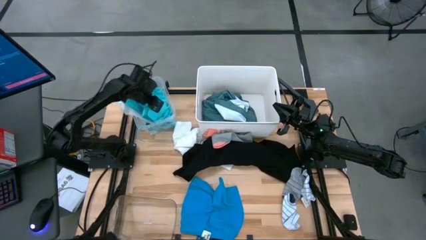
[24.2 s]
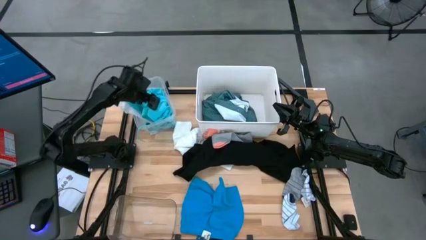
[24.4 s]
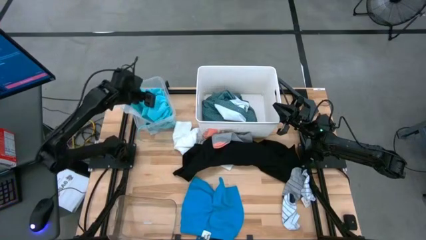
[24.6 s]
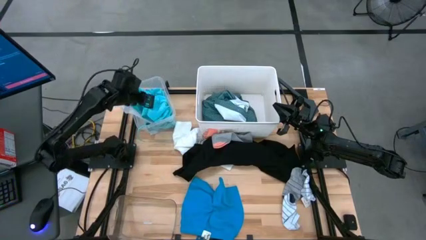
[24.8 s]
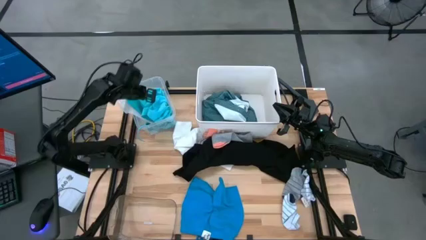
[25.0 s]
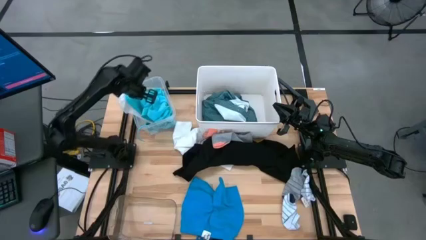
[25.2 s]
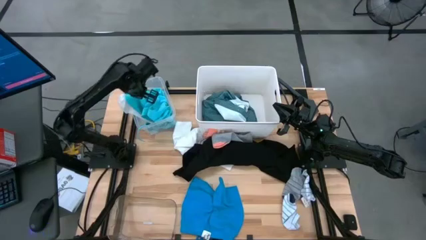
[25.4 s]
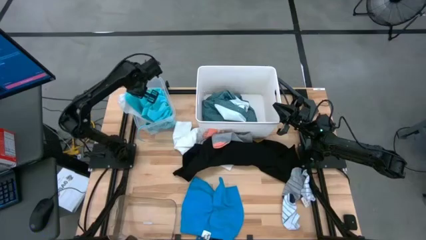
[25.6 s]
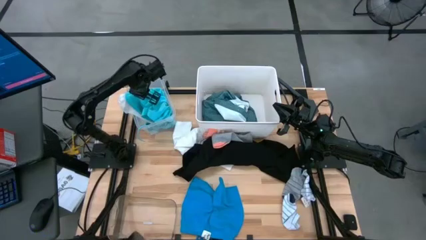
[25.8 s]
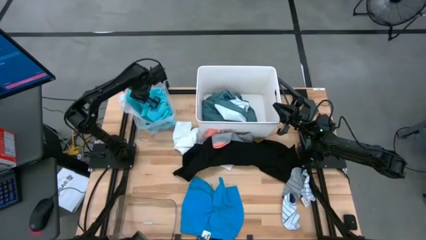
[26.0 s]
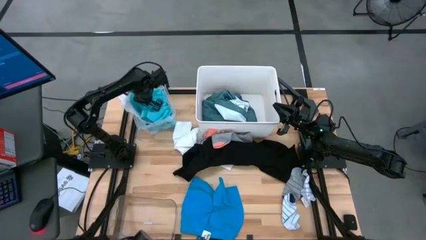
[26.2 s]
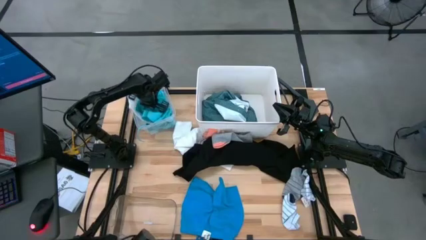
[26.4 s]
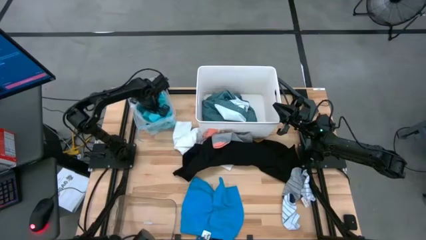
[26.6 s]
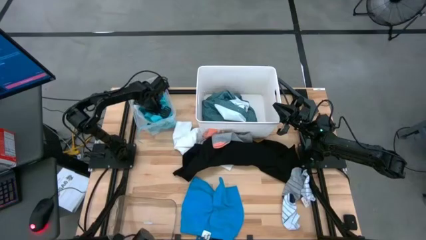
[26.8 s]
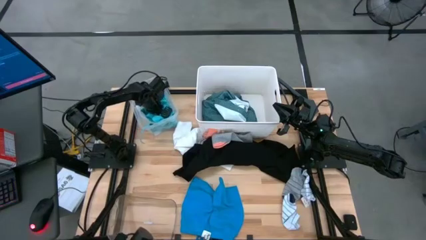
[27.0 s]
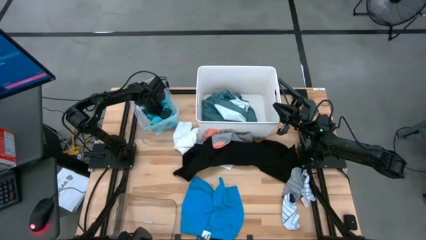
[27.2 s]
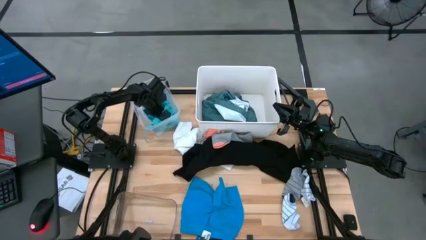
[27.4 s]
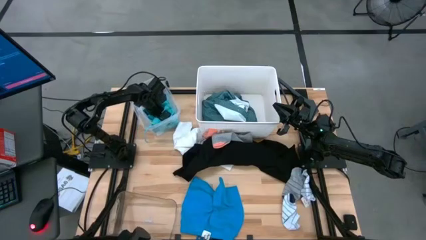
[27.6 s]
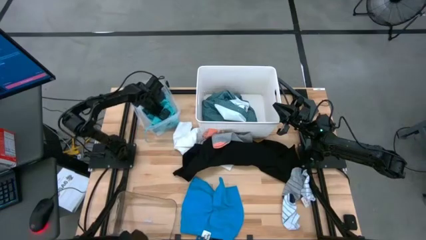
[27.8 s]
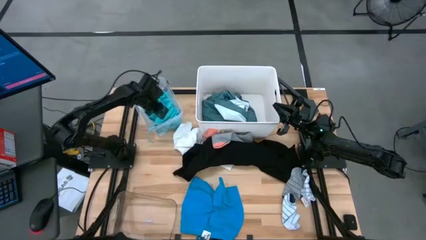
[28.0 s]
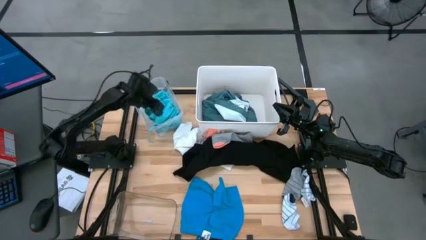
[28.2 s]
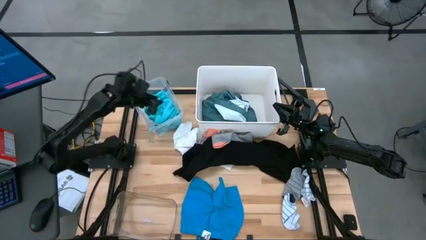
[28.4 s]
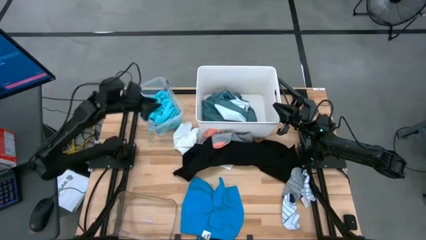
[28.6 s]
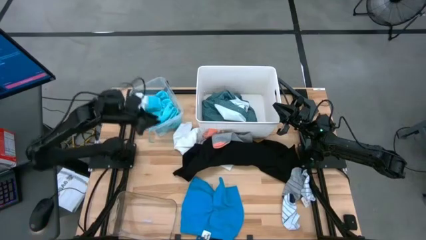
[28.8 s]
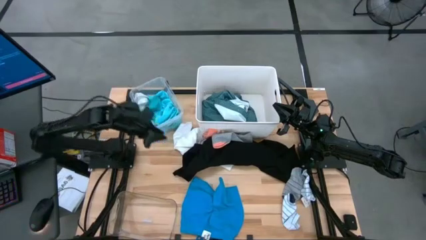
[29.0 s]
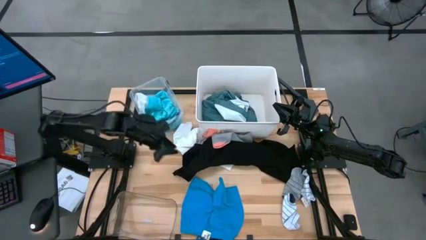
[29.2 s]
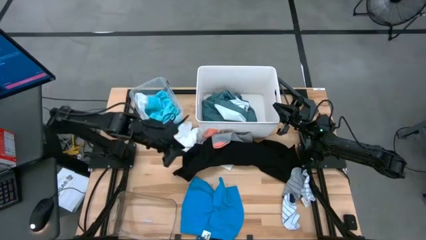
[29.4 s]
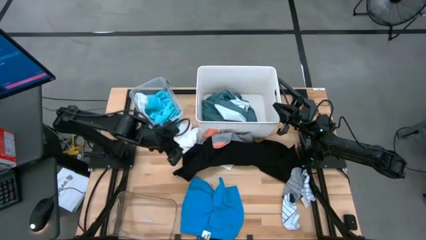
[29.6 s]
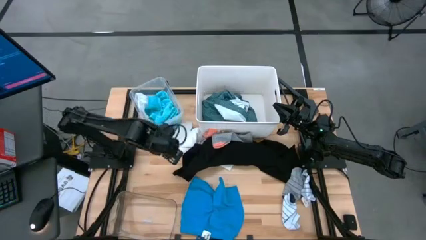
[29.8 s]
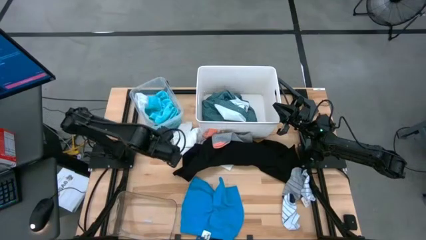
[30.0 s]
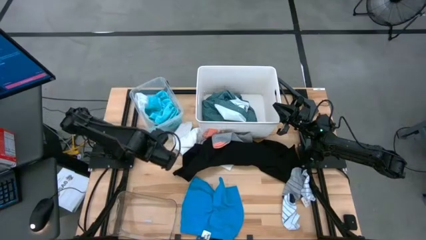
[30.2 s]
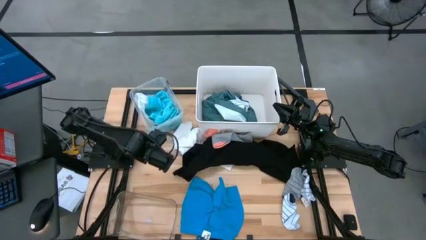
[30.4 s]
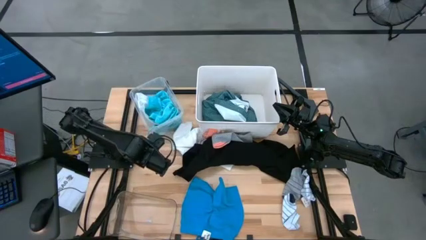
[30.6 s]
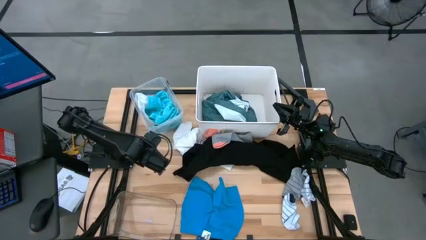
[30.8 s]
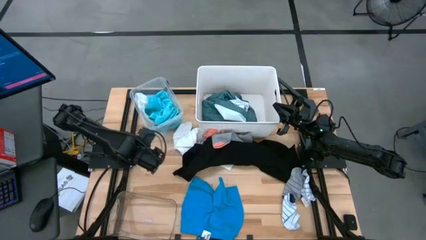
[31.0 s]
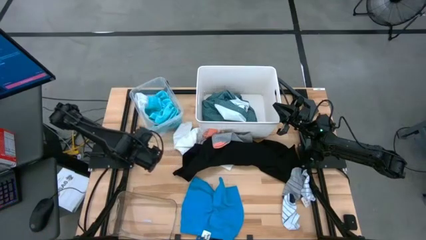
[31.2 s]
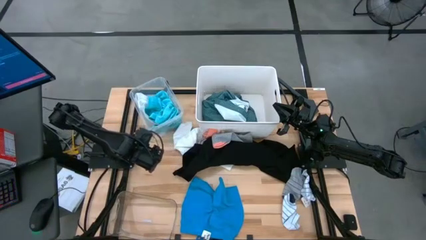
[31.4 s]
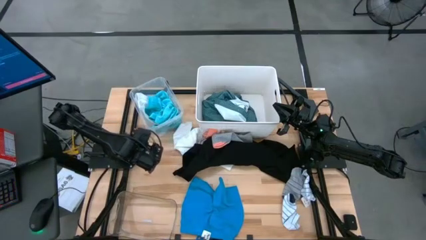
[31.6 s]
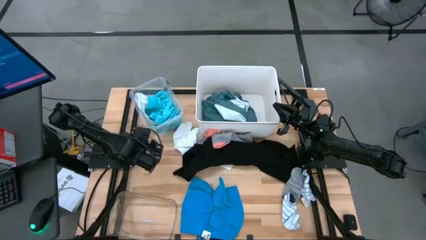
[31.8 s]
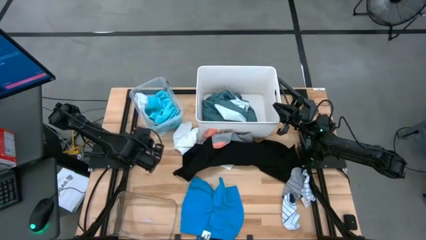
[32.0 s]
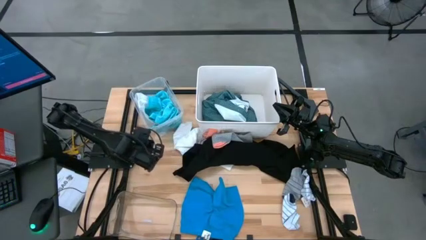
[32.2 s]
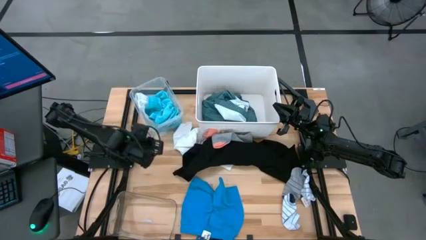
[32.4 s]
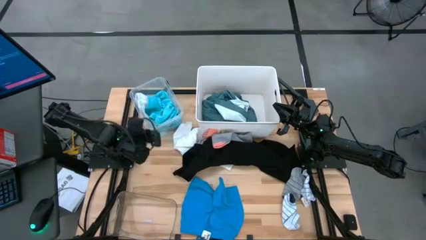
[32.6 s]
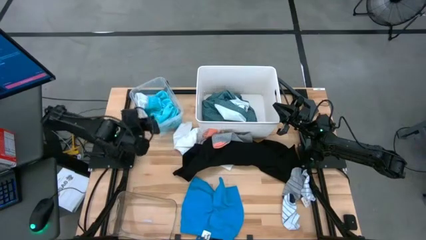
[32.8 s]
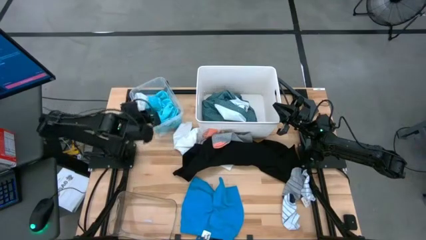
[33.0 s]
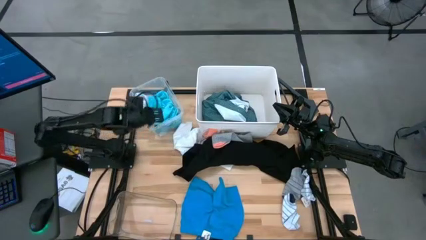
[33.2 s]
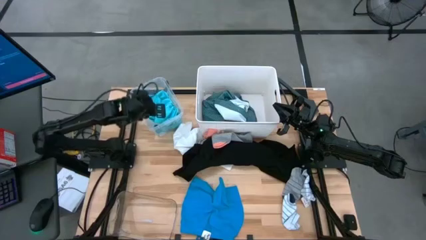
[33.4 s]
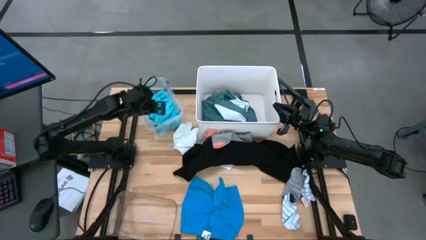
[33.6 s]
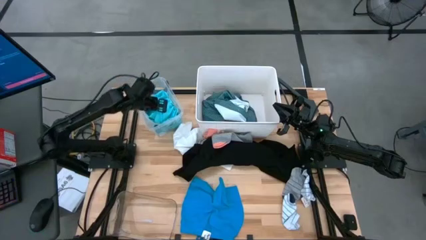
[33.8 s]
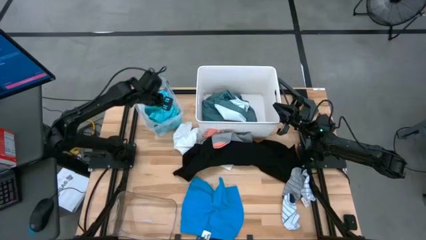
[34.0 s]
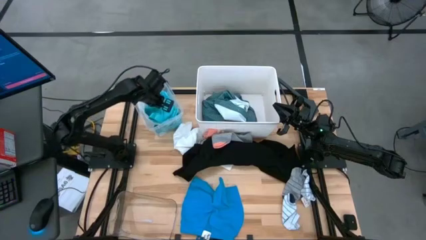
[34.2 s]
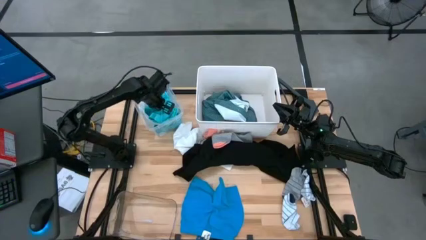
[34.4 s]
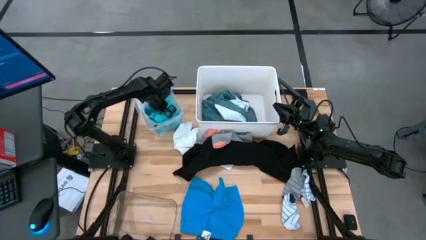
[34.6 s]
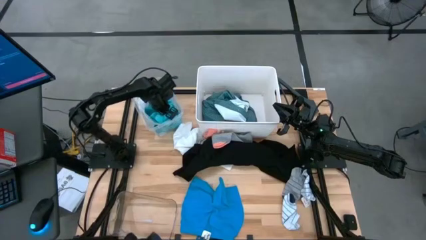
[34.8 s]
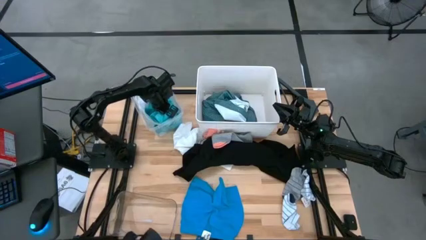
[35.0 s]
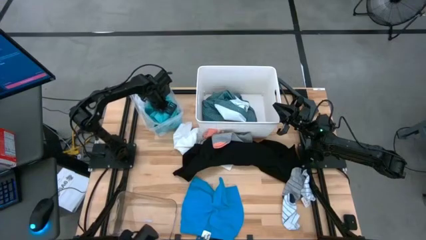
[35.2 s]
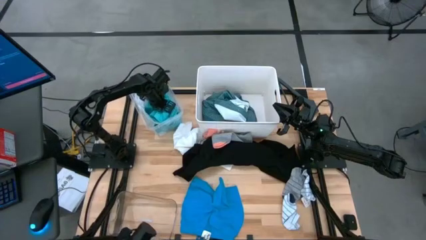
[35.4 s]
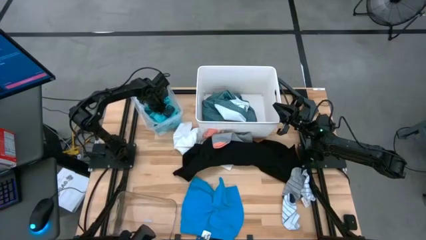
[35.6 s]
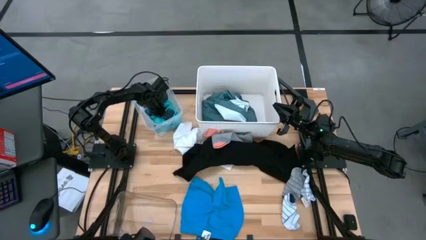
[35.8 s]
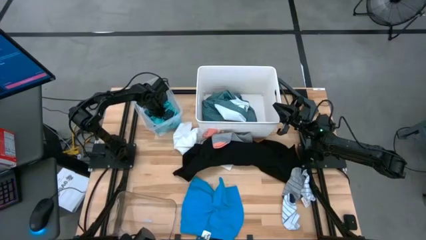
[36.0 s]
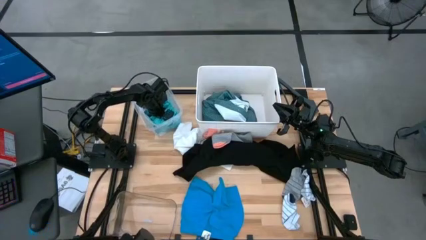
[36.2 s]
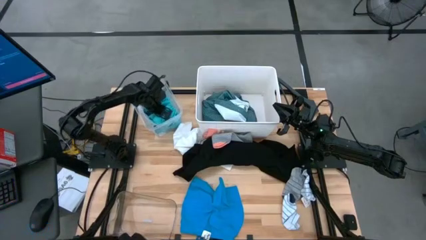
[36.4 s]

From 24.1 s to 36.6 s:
Task: Pick & Place Cloths
Put the blue shorts into the transparent container

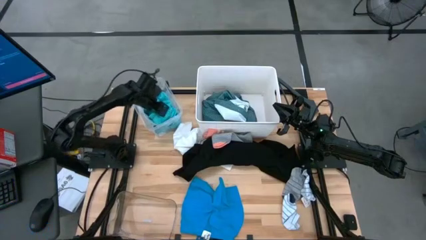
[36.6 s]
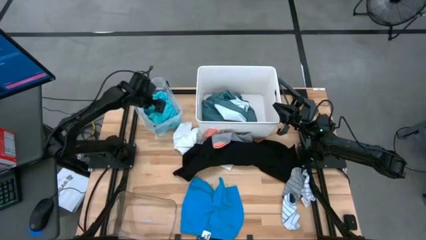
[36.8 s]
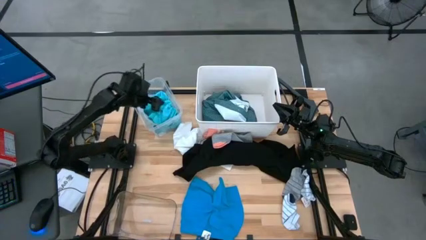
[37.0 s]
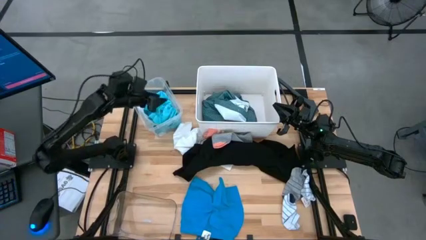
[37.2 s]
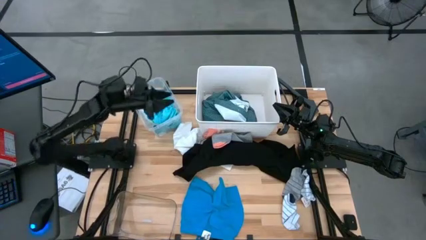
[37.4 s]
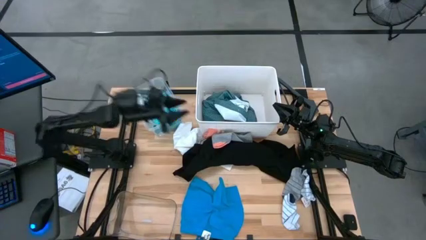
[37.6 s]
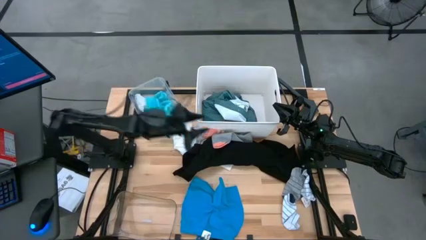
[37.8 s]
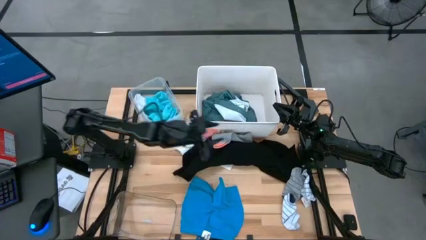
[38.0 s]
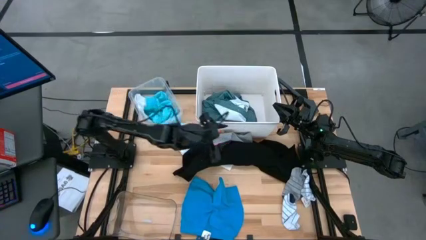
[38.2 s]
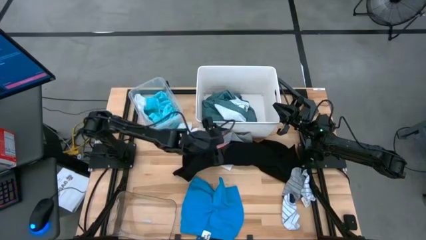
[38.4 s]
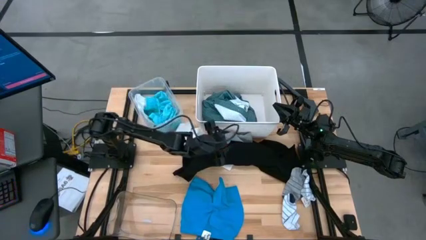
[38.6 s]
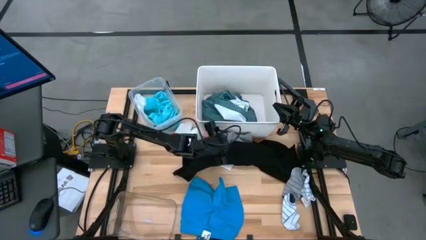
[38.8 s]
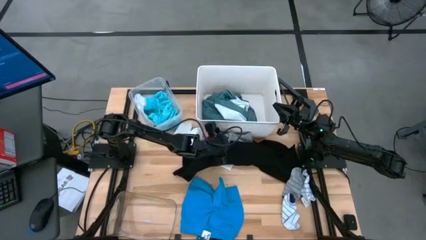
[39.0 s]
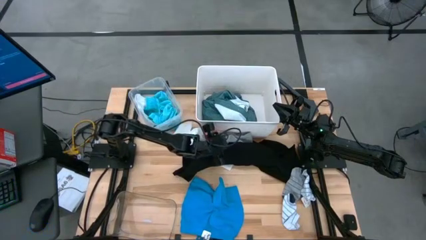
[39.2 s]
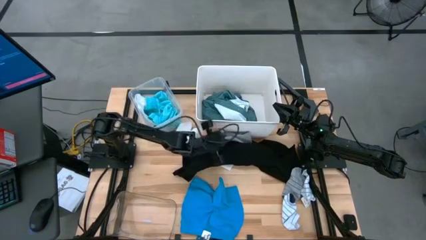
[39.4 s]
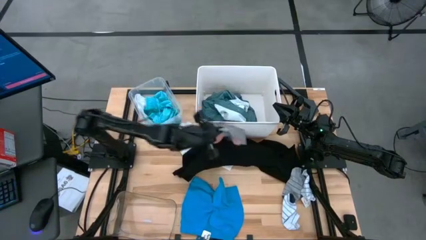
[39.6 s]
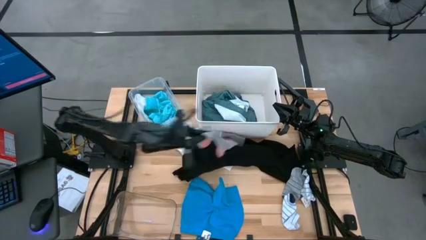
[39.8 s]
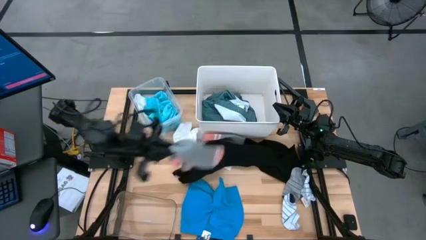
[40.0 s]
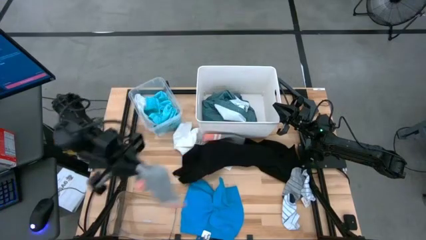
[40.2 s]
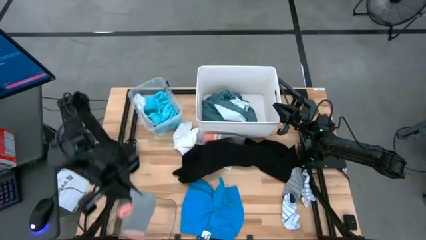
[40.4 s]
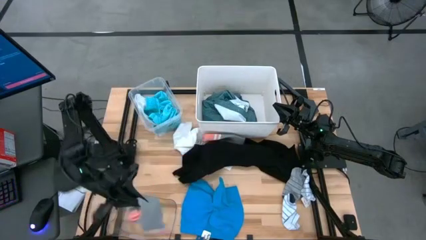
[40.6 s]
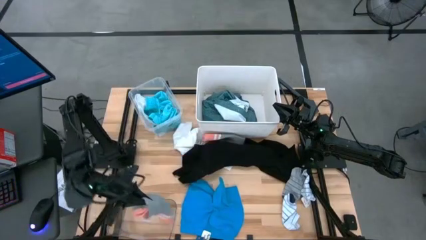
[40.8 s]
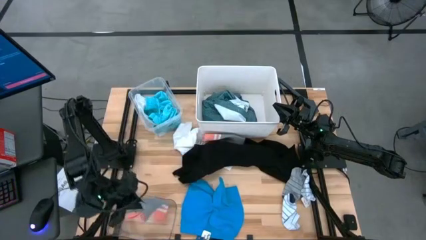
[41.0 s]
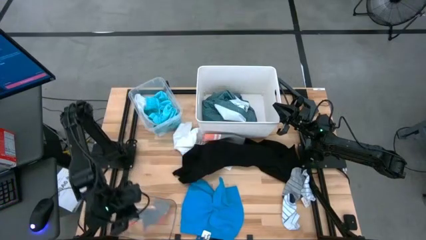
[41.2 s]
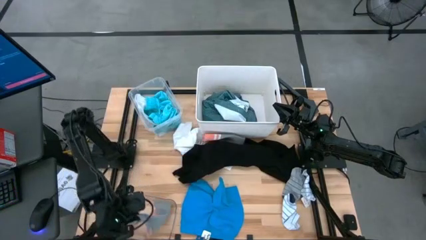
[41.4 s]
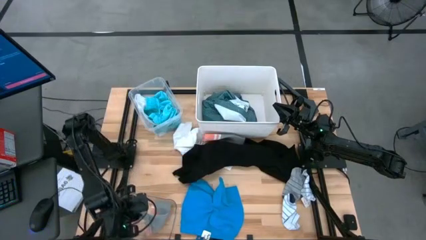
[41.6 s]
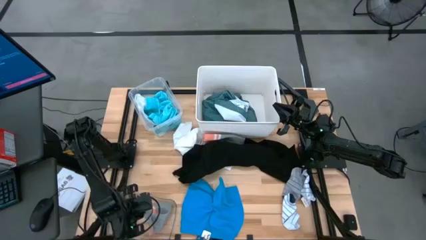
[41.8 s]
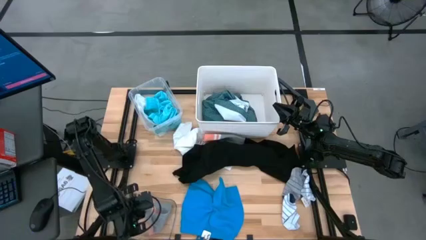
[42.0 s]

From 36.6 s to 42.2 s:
Put the gray and pink sock into the transparent bin
